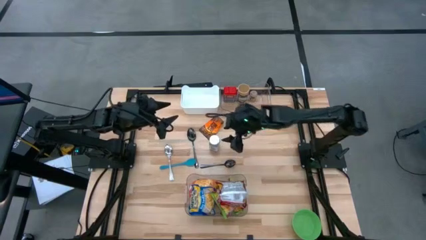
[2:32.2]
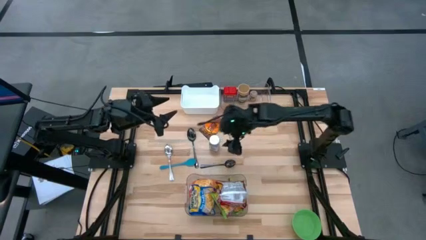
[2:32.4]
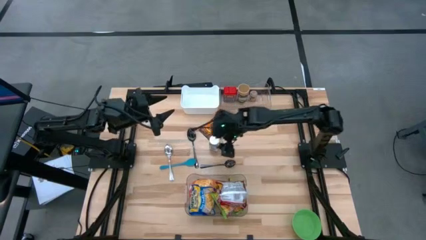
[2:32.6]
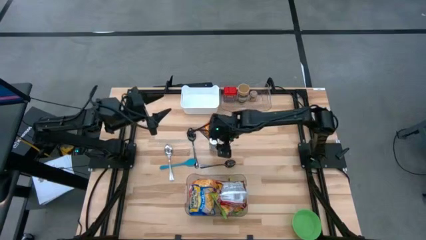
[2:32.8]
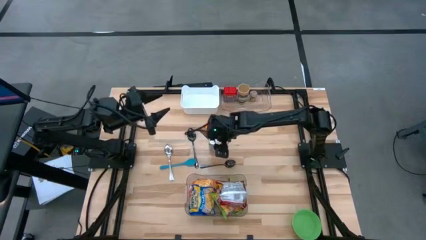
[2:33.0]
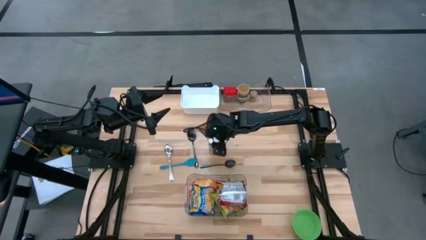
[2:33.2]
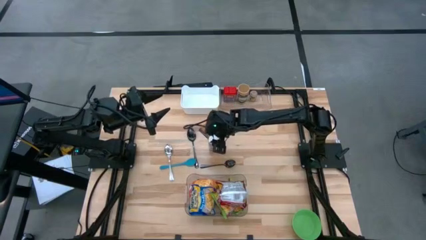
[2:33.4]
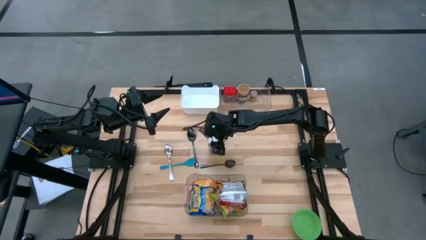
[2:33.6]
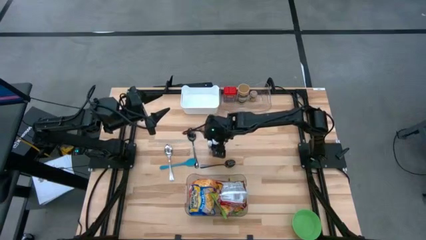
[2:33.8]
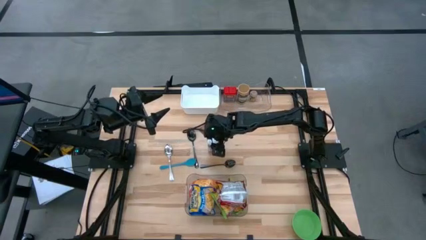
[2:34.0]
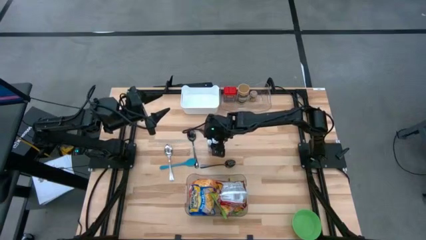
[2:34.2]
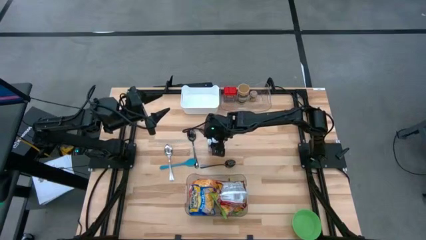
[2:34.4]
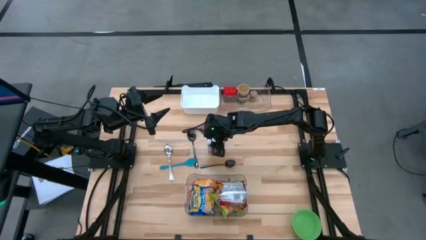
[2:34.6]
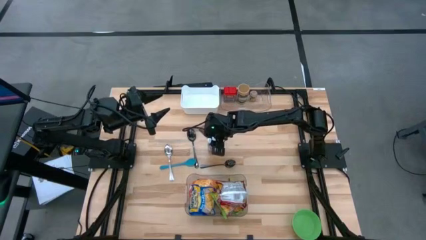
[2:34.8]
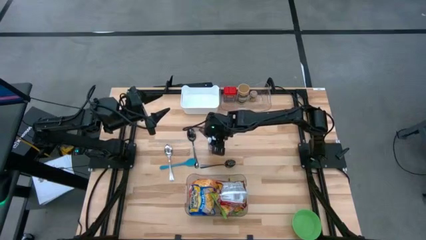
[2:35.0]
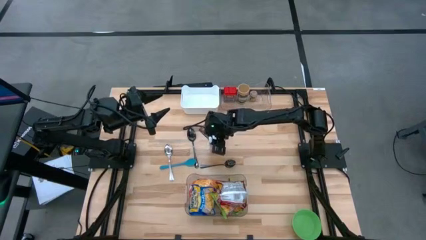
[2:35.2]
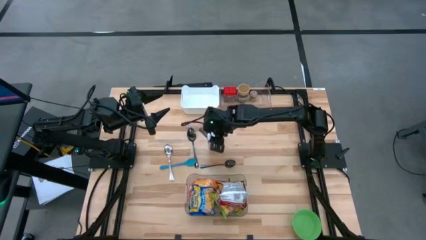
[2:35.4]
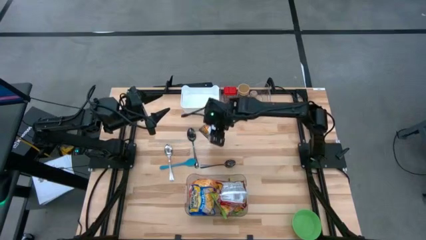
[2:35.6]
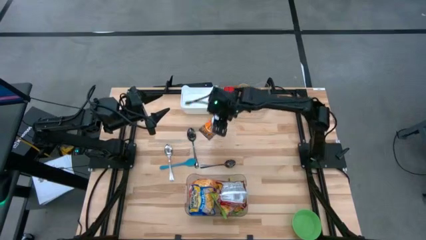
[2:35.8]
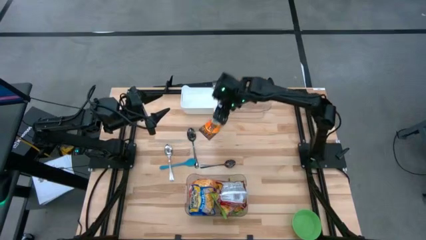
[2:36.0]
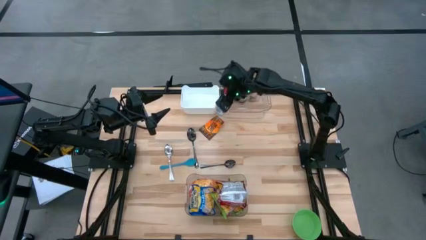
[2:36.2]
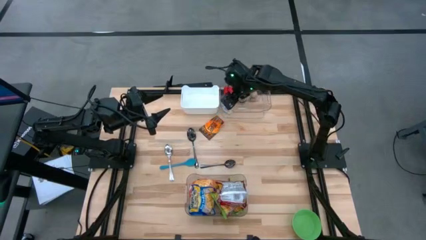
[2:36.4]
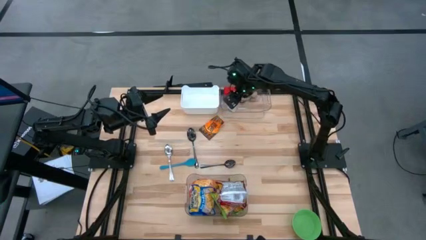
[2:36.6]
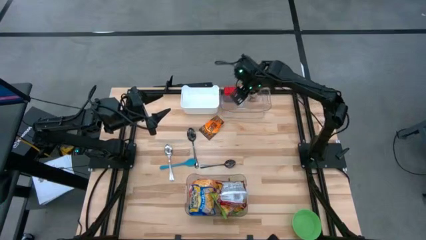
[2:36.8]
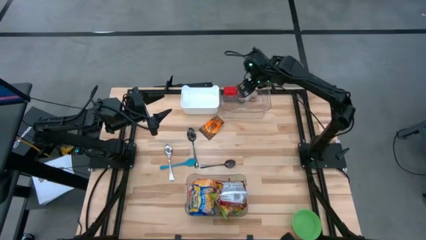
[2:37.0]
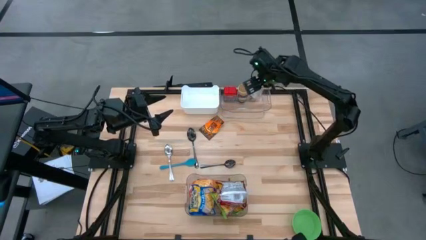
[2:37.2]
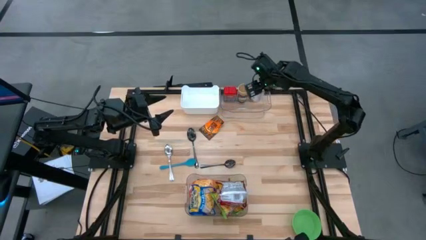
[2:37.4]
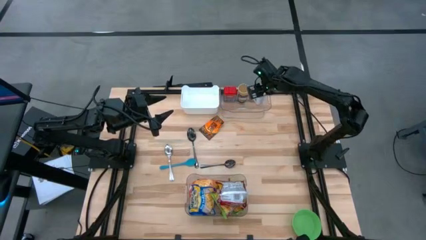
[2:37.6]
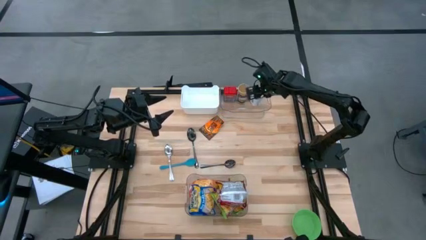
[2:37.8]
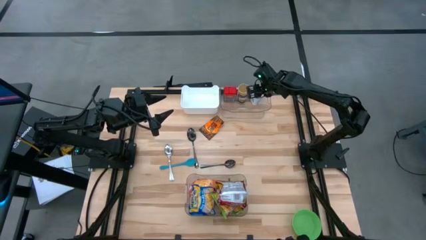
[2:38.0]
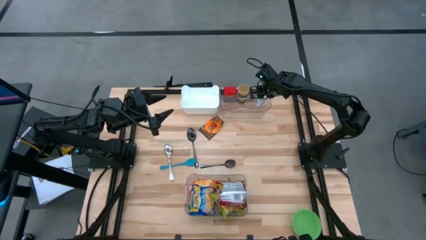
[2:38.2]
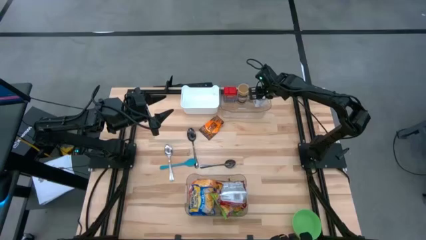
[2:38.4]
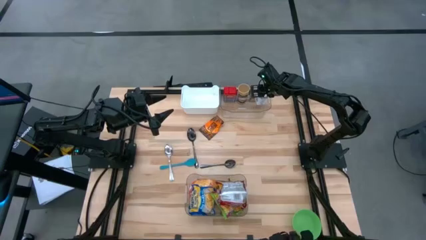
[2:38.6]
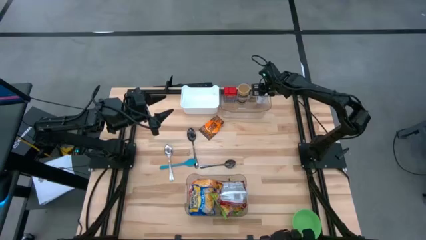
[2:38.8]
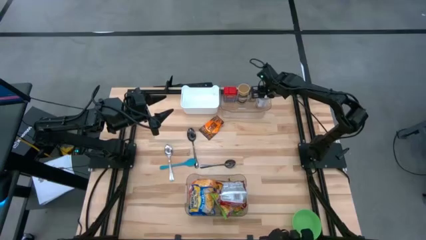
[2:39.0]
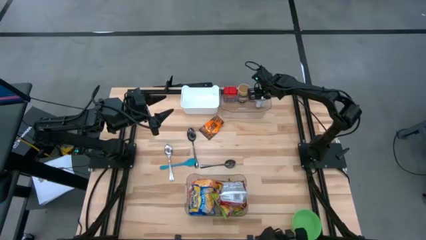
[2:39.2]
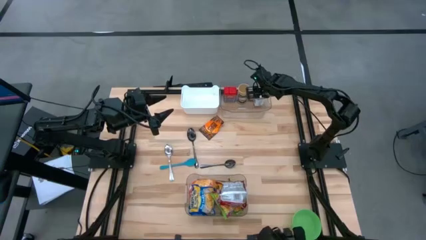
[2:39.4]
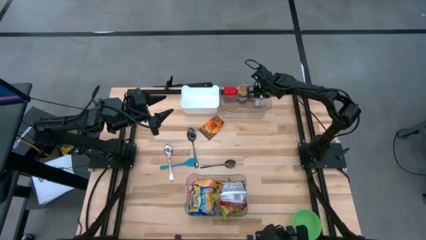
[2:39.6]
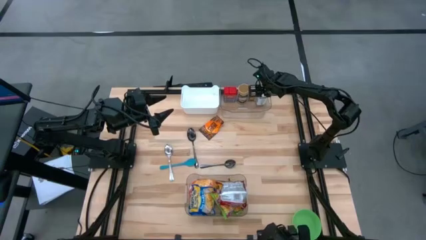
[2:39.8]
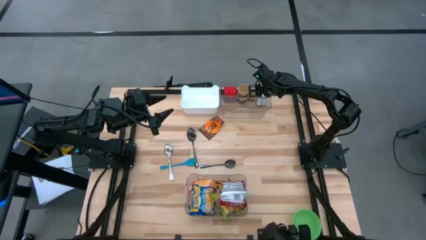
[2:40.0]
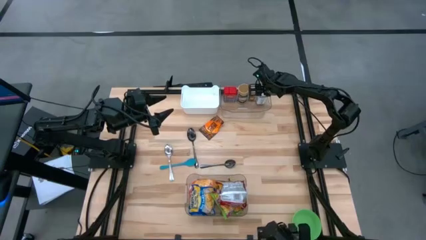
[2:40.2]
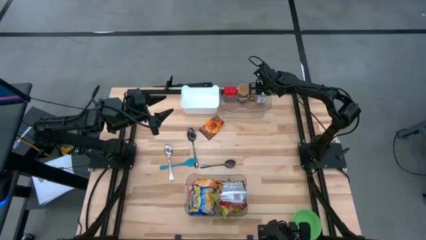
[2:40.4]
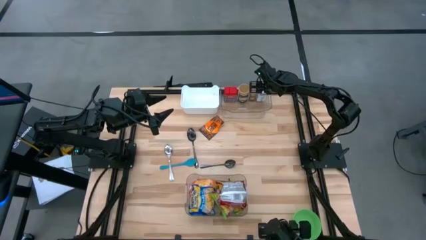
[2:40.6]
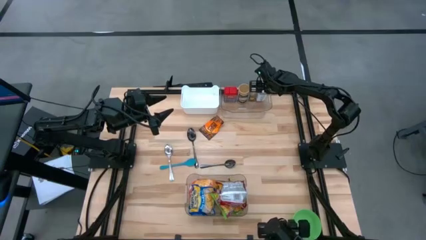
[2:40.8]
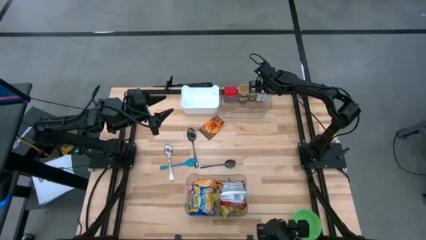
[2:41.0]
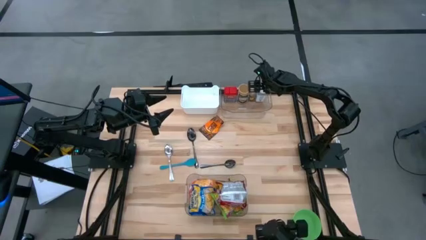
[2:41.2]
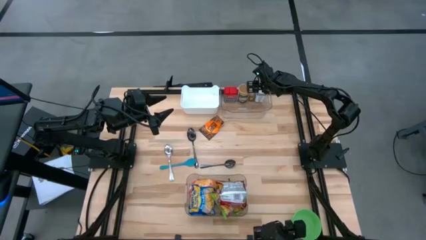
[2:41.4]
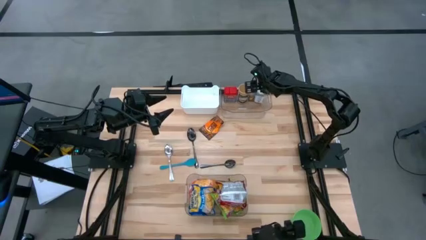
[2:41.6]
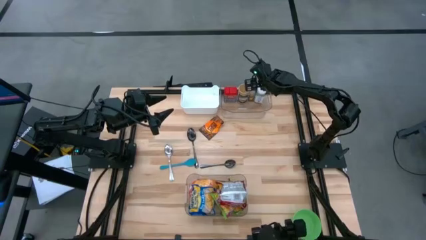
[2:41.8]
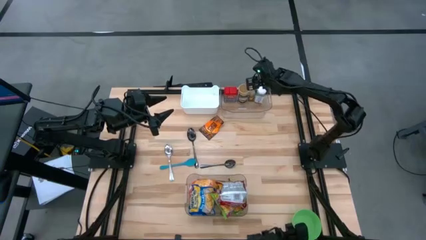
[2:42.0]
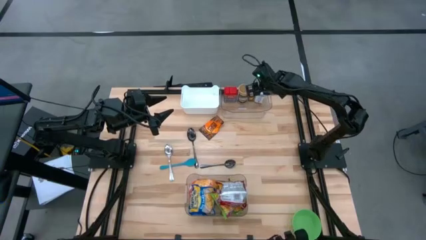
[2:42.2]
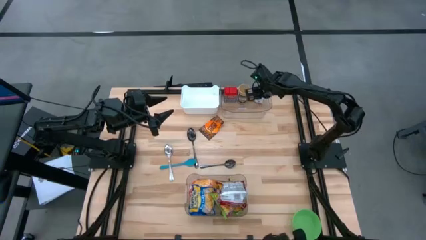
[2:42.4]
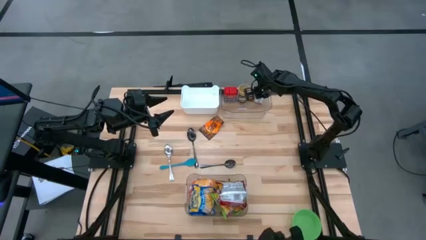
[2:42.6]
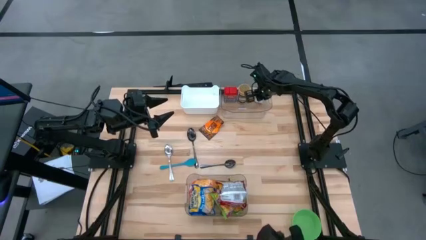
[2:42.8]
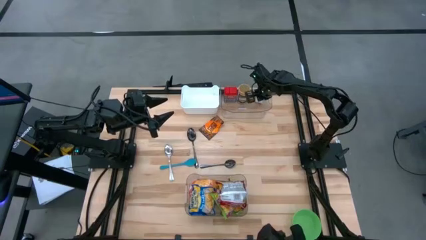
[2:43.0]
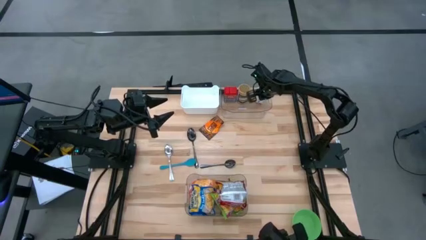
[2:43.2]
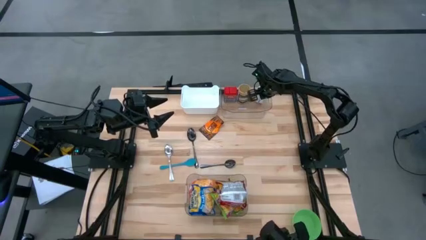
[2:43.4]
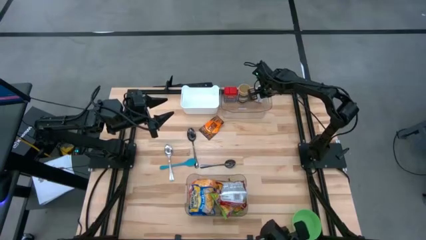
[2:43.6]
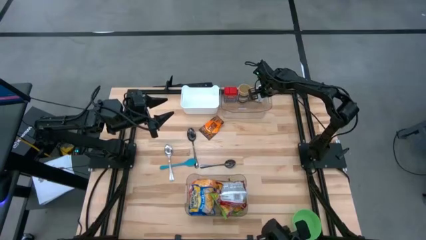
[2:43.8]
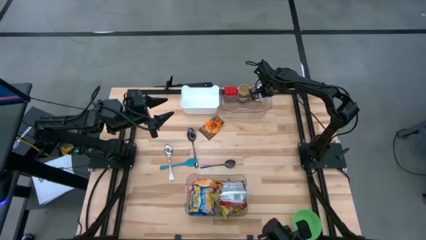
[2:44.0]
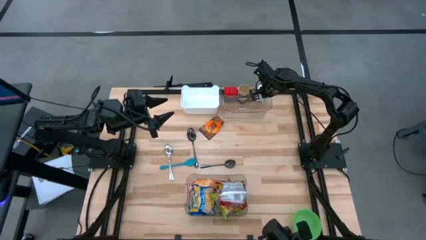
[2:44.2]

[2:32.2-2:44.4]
Task: Pick & Place Food Item
Put the white seasoning into the top transparent bin

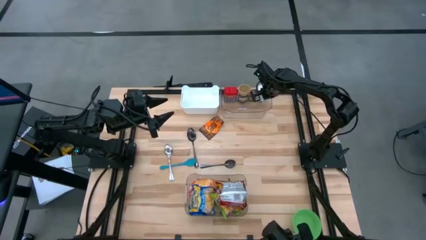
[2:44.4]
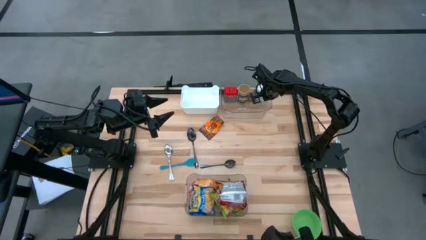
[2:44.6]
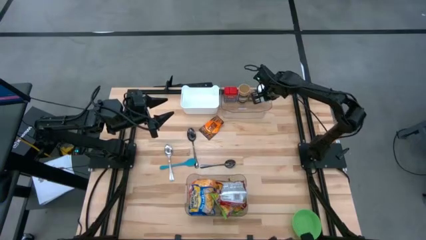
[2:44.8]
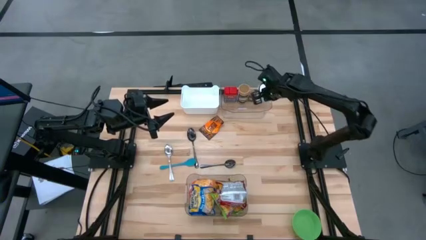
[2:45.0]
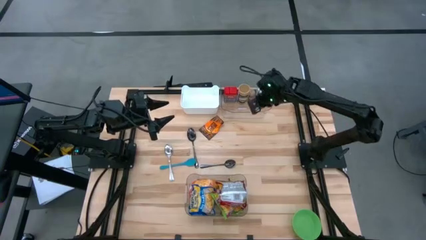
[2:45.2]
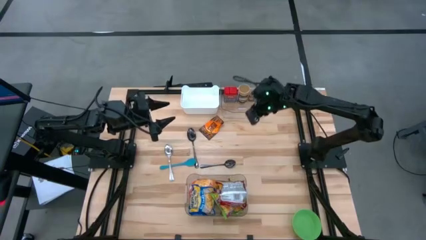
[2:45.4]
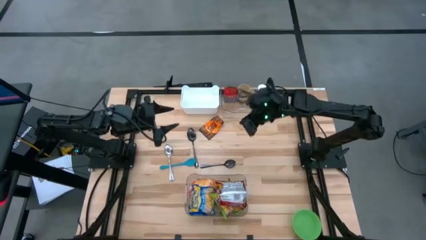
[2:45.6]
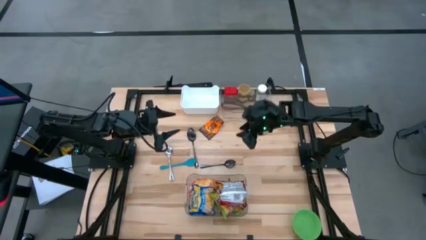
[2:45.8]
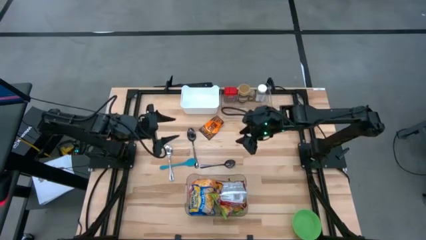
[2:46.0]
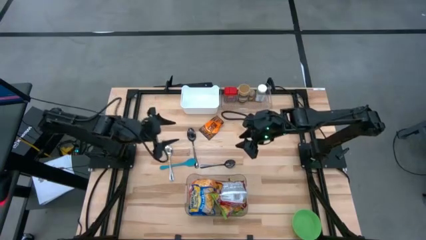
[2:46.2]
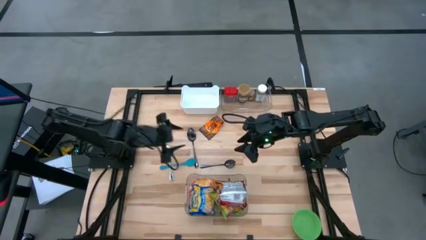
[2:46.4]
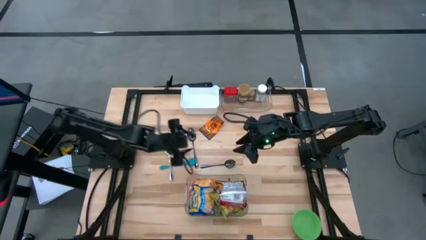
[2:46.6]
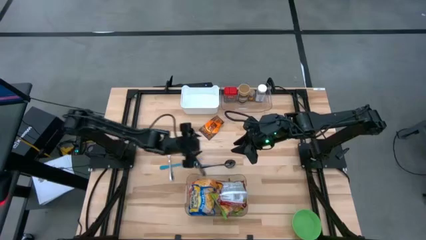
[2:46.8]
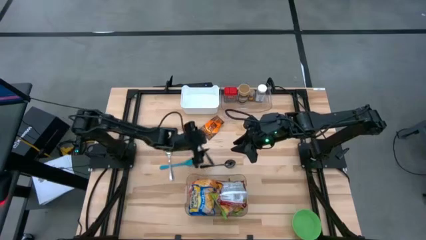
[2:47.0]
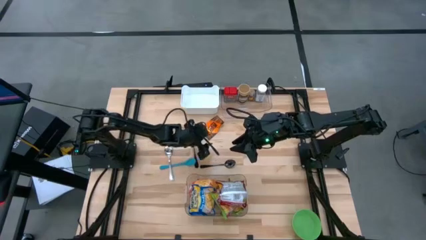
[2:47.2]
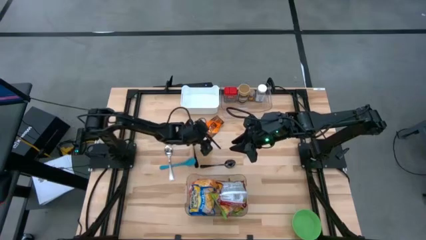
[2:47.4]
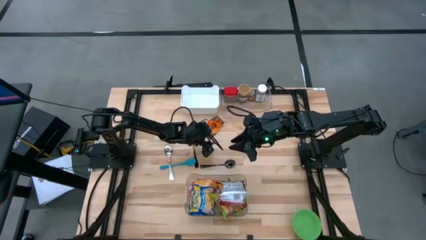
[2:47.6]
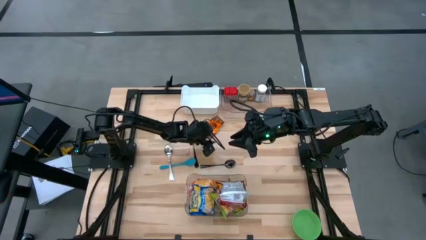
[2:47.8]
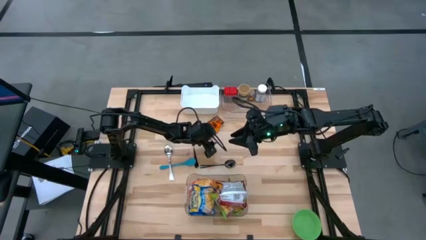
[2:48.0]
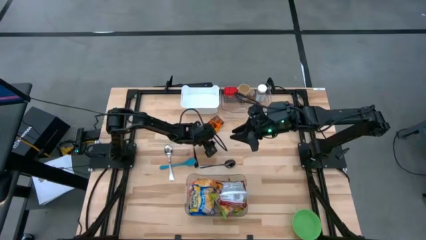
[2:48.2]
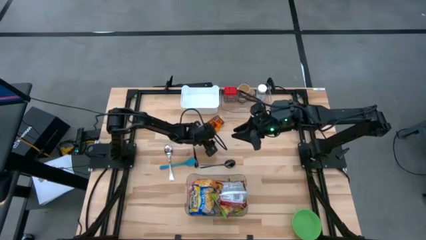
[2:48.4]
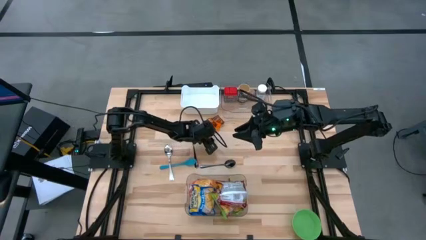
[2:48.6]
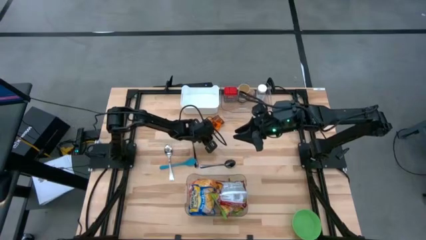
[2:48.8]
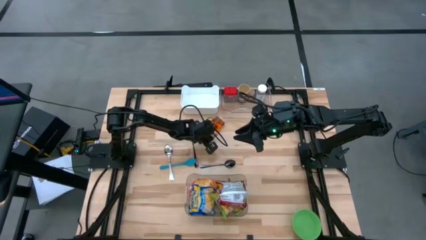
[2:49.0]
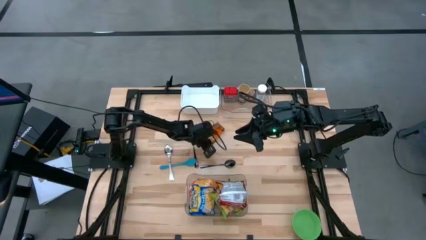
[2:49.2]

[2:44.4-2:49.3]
Put the orange seasoning into the top transparent bin
